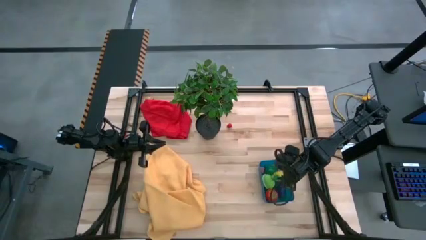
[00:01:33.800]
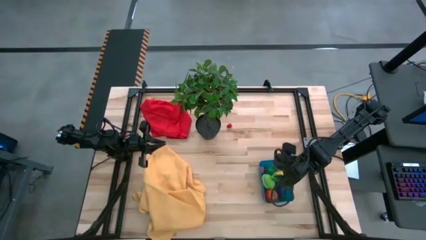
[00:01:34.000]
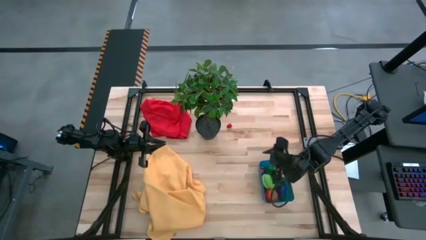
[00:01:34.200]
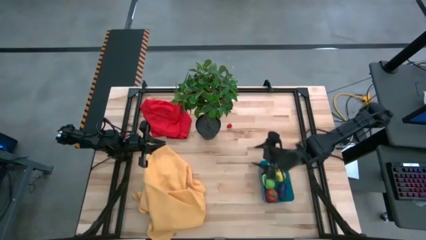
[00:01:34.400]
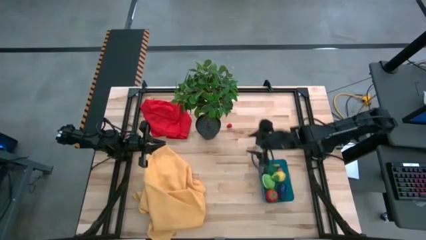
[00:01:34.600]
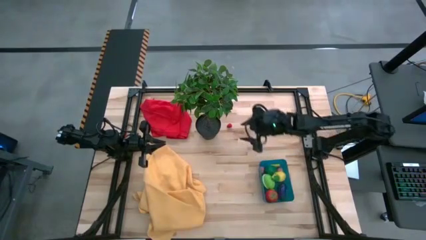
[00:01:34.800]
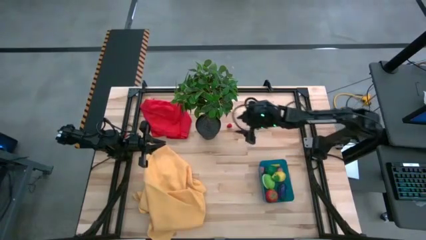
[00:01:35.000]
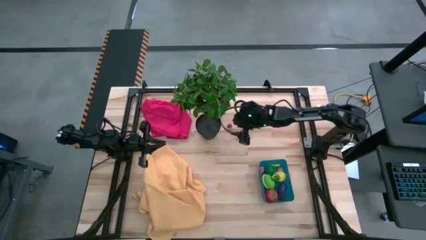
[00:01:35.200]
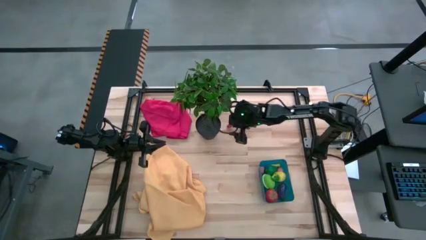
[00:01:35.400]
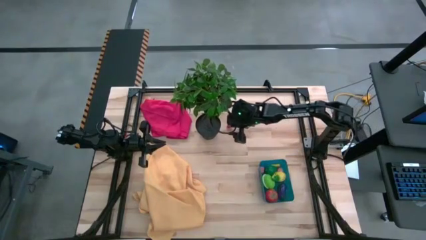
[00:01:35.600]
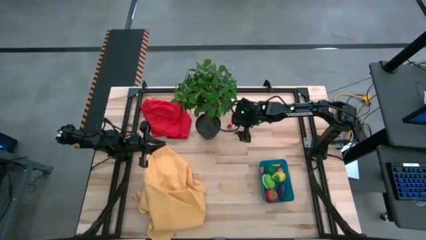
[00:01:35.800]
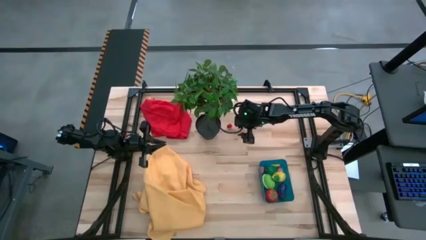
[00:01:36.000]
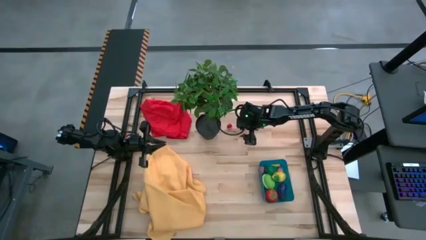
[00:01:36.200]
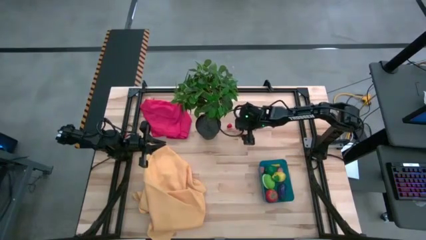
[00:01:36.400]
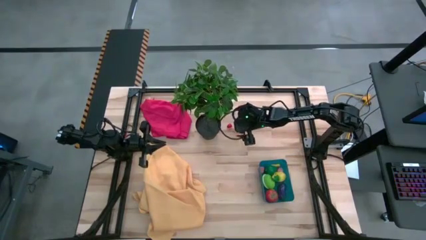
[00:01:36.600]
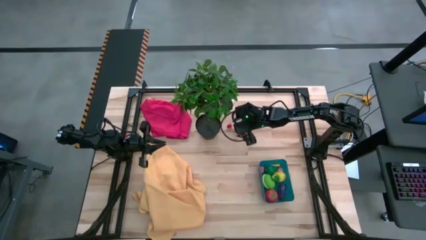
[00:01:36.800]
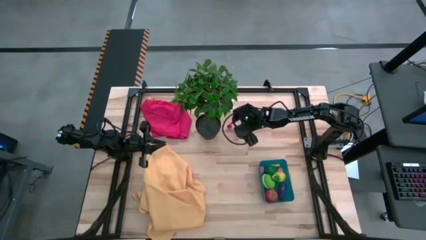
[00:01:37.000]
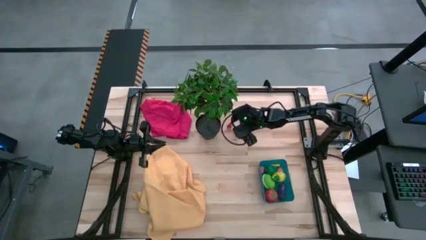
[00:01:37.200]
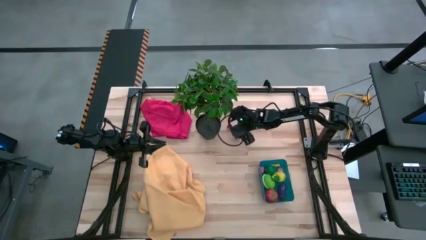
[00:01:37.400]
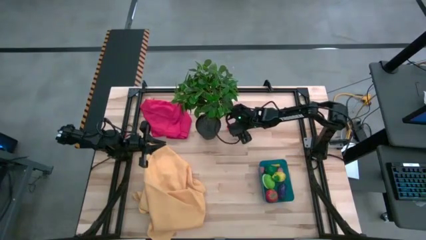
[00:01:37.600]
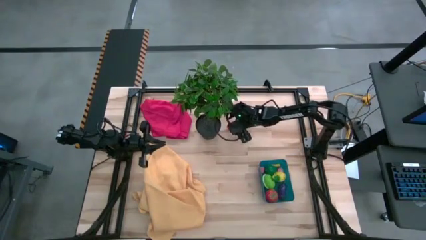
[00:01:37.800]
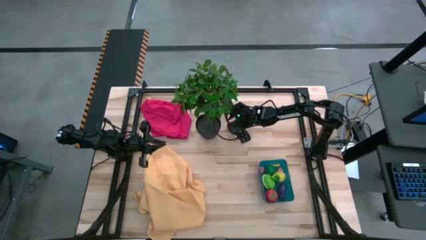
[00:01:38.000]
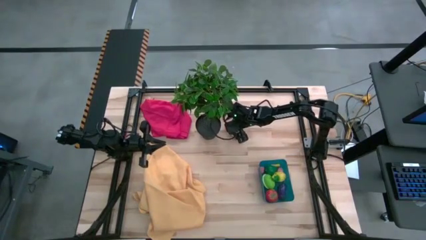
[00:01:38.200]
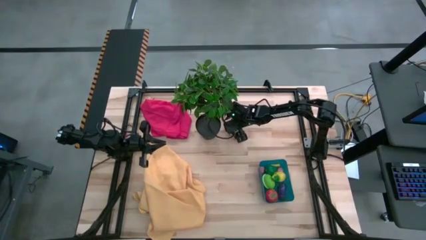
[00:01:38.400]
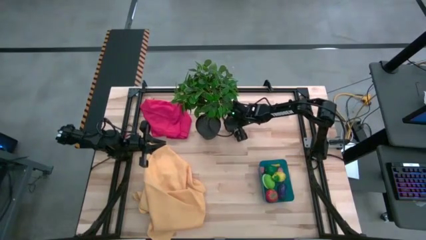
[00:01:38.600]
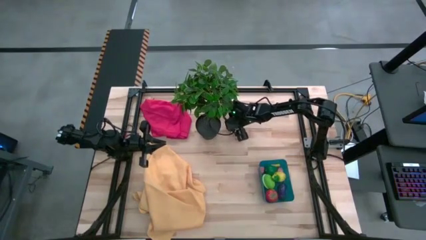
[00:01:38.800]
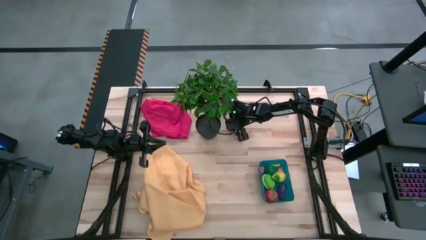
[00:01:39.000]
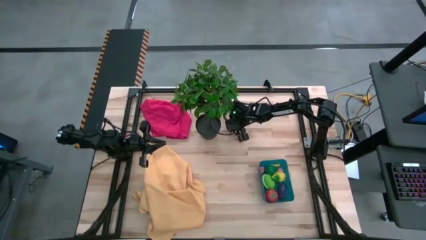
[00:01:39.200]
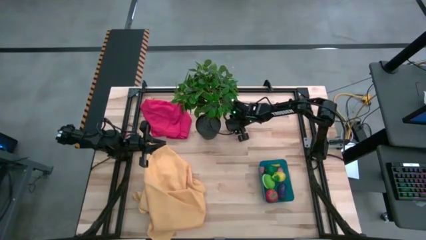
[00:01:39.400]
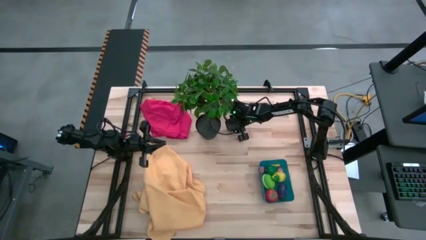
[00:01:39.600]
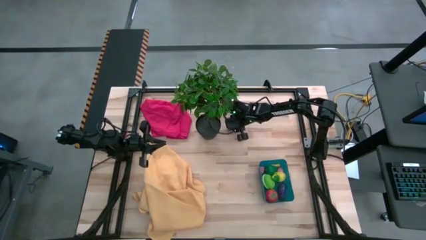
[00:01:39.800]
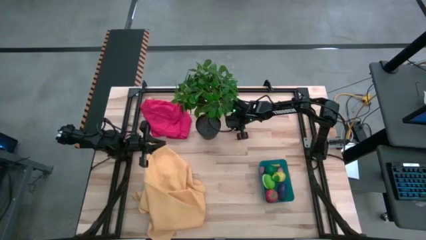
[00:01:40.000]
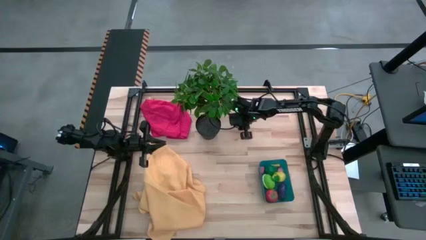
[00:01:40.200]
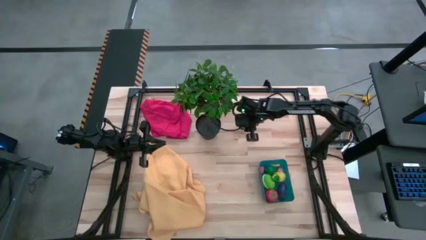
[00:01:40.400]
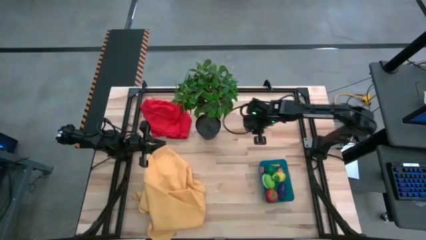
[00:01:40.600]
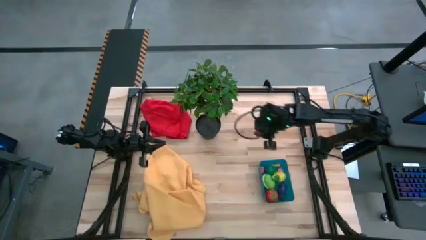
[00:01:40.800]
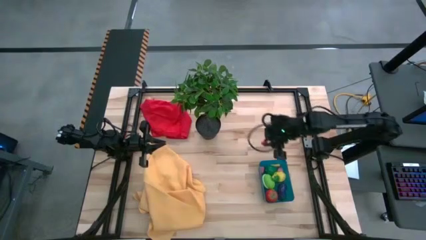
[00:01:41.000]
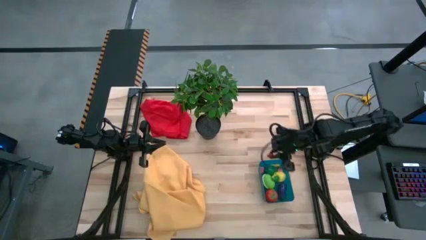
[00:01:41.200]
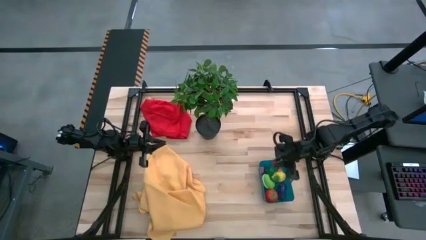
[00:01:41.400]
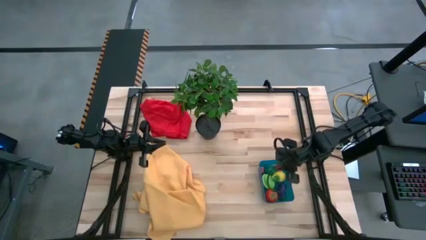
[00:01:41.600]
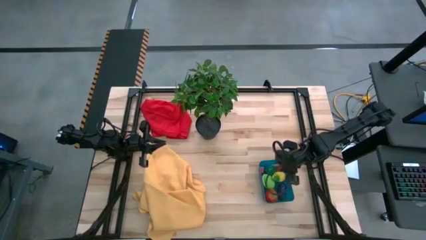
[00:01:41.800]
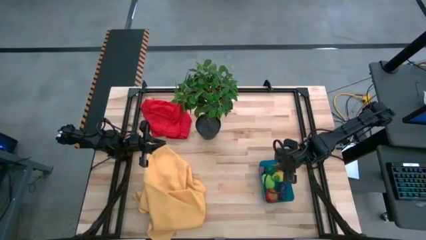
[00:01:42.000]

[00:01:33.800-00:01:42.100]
Task: Pick and placing Produce into tupperware
Put the raspberry into the bin

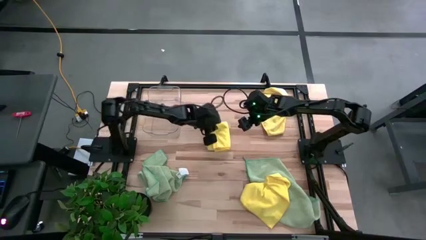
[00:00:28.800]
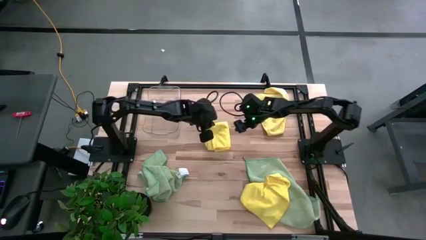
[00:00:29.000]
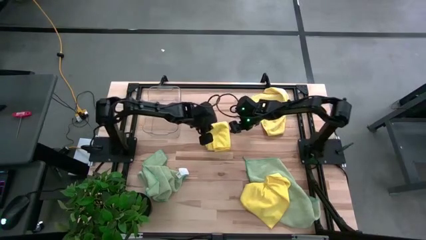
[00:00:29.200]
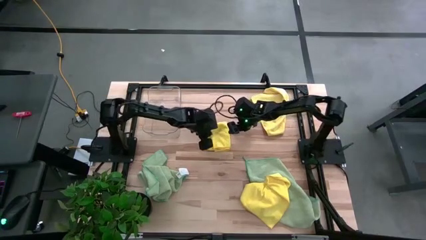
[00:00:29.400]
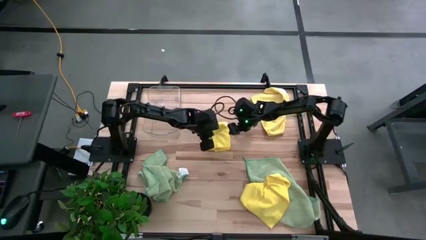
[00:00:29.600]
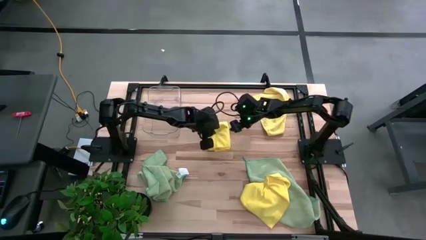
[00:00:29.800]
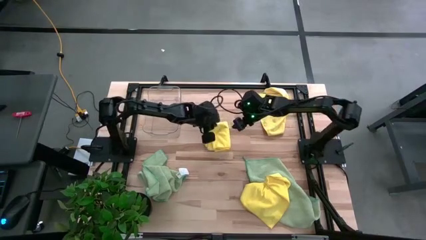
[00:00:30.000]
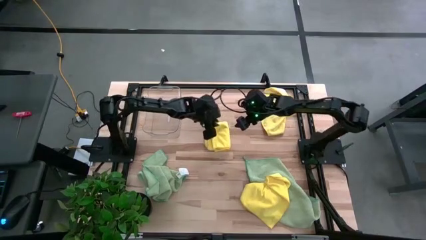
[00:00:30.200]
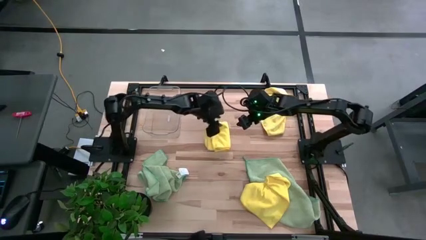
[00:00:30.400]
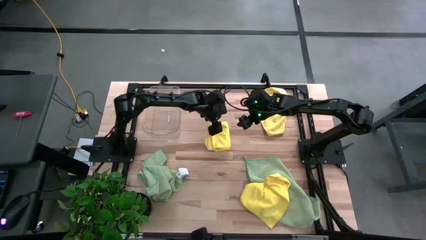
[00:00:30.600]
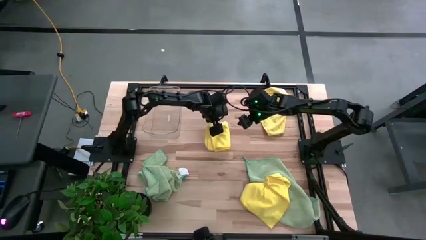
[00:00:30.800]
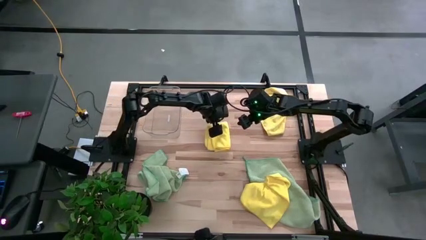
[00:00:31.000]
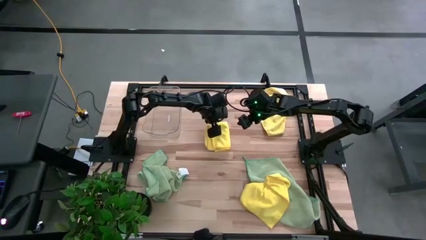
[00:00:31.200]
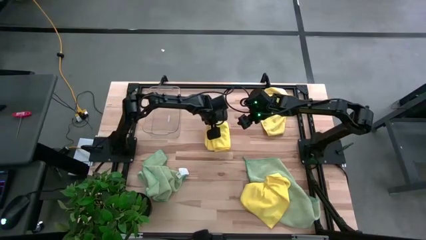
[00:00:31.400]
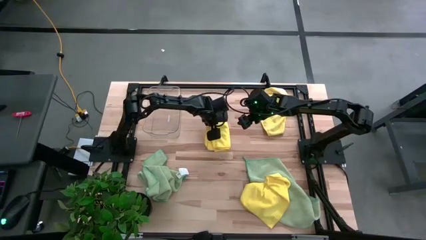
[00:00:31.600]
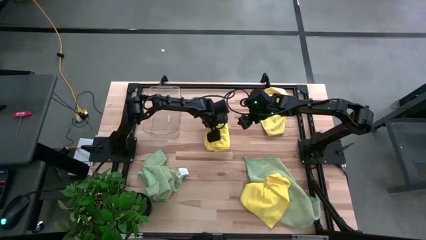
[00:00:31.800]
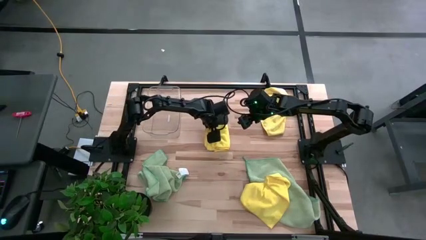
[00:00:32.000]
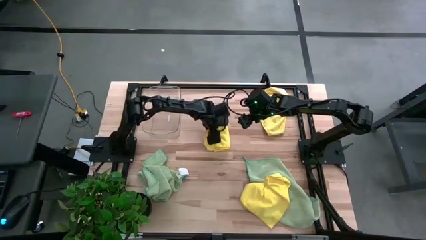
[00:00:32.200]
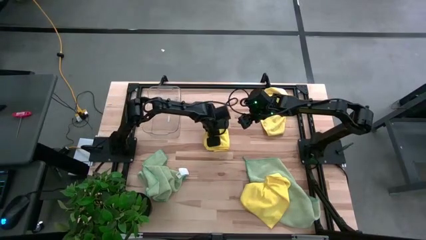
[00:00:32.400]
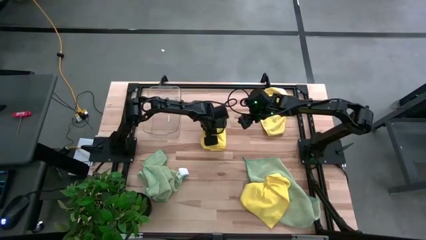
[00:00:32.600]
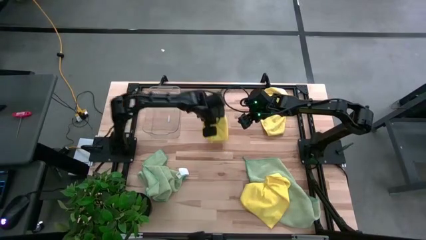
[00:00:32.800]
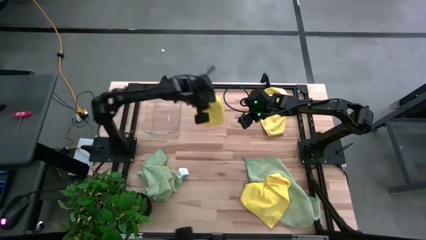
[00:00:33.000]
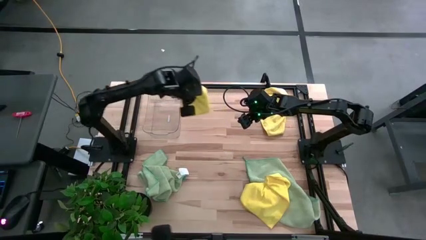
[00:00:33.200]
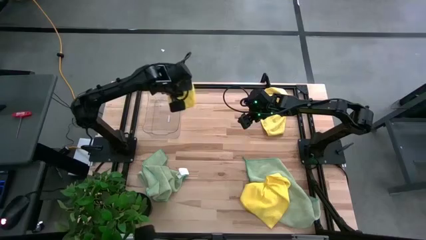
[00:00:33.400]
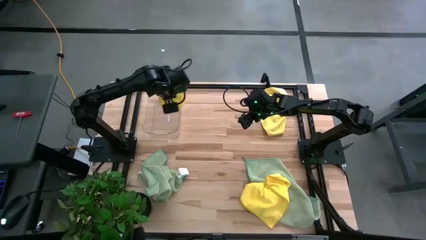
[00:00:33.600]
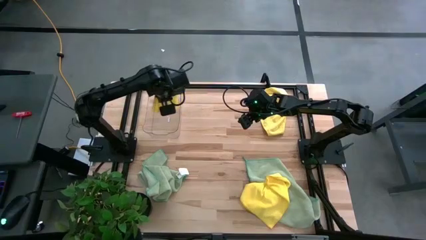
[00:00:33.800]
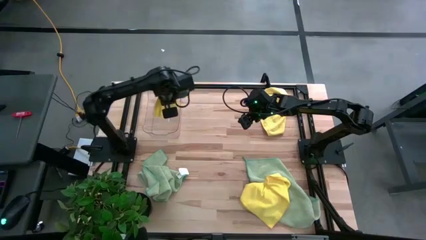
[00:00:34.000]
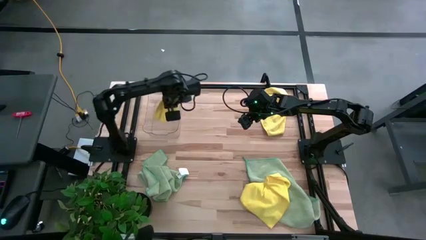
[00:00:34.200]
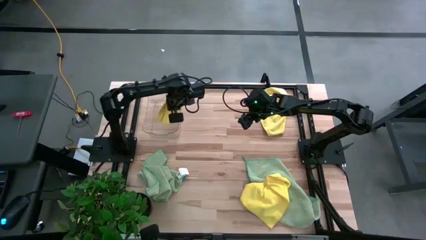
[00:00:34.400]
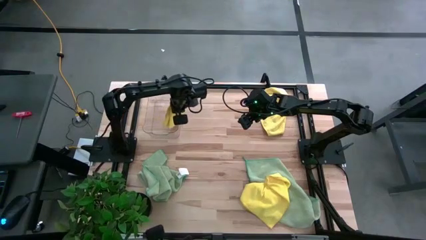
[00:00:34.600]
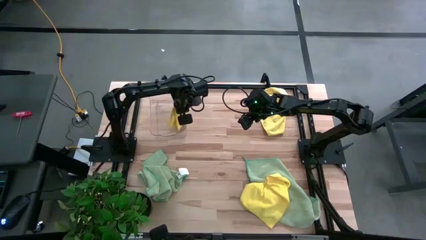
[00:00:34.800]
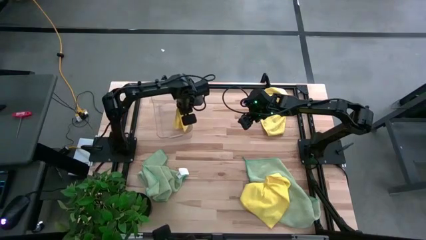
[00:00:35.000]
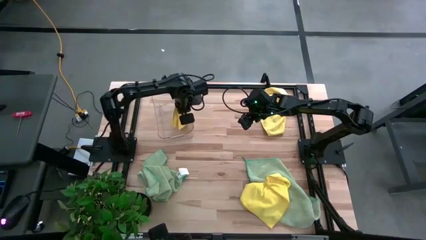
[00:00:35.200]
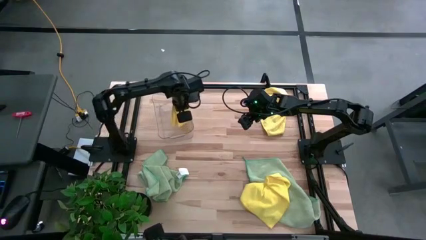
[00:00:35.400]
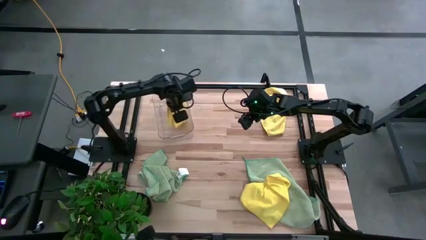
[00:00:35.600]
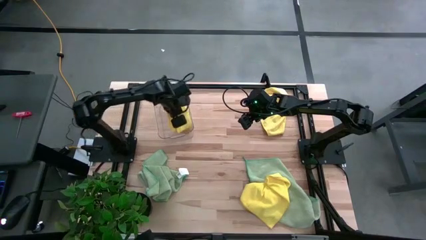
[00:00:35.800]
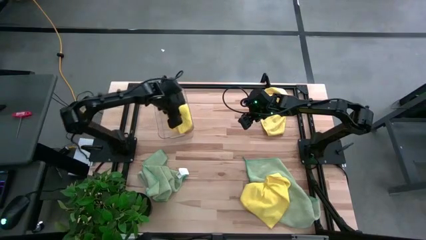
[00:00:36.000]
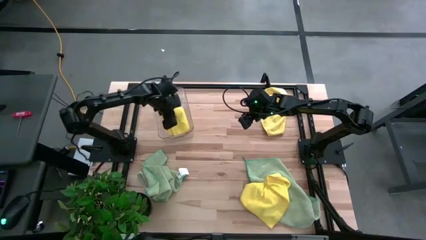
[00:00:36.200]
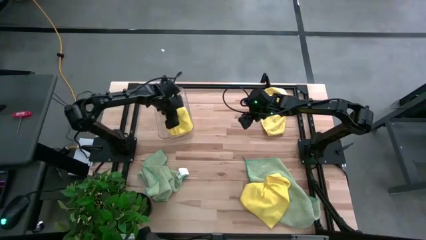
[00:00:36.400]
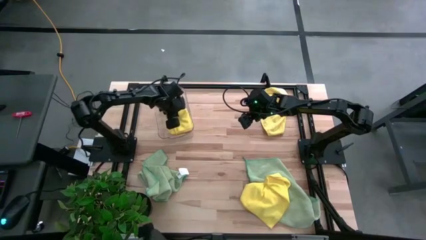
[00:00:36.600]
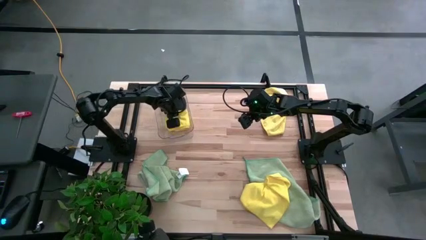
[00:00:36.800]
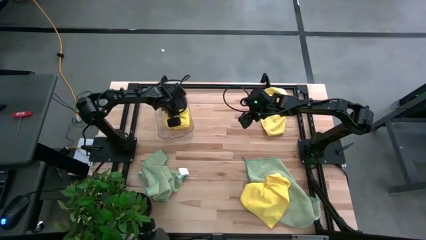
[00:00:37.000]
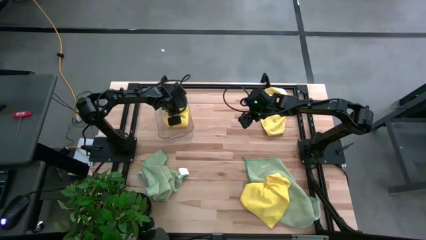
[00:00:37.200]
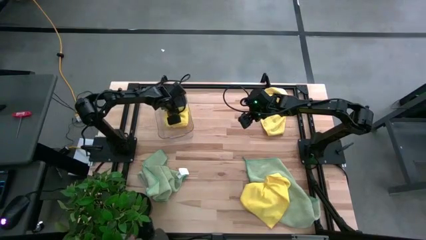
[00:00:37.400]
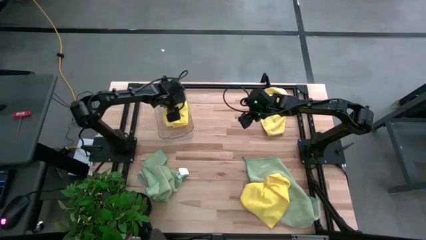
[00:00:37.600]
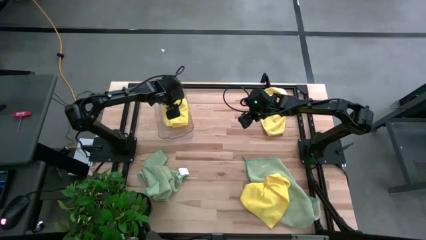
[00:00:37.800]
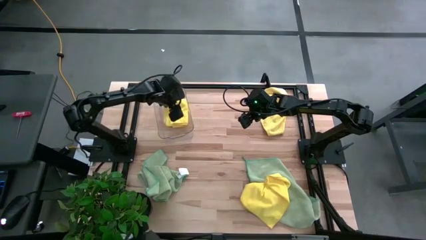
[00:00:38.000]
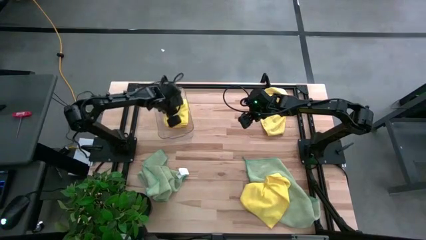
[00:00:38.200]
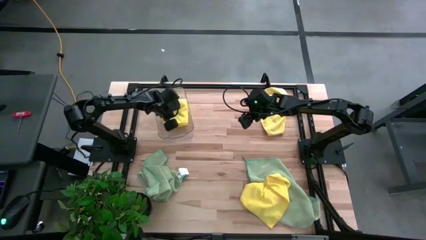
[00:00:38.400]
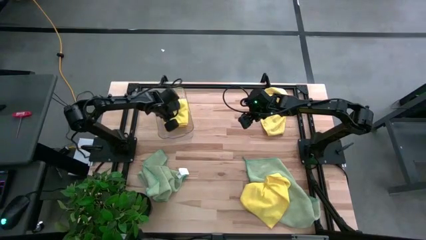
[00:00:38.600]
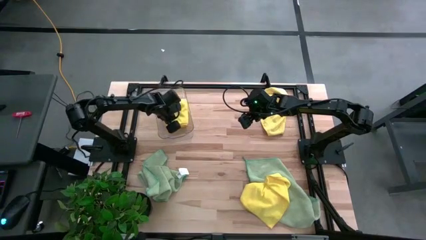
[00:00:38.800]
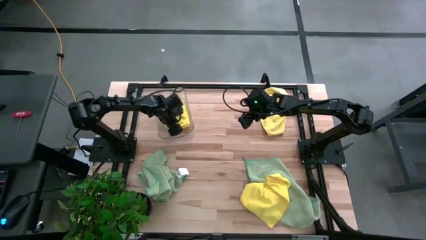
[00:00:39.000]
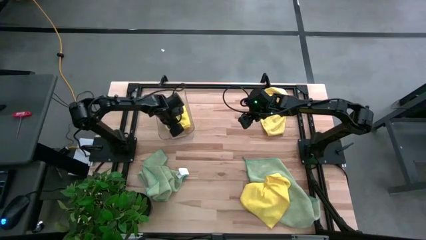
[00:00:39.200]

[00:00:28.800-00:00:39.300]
Task: Fold microfiber towels
Put the top left folded yellow towel into the transparent bin
